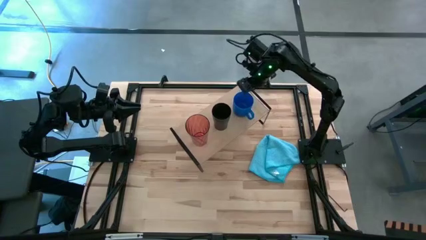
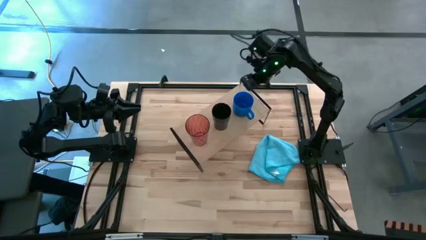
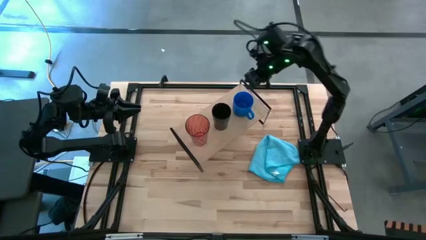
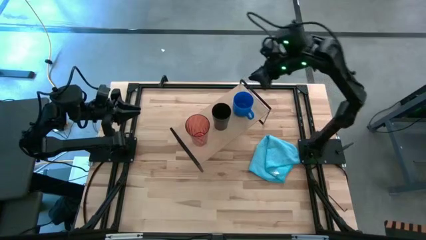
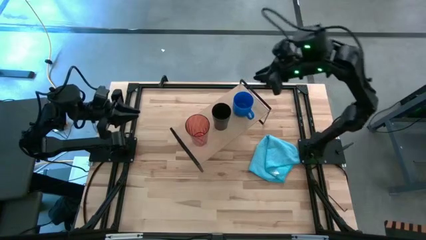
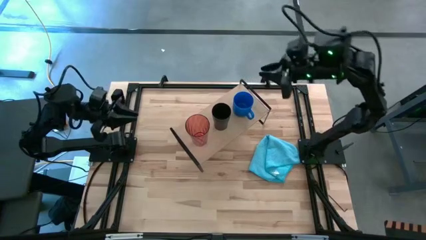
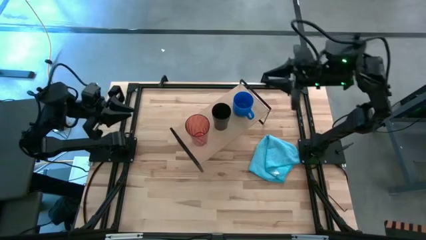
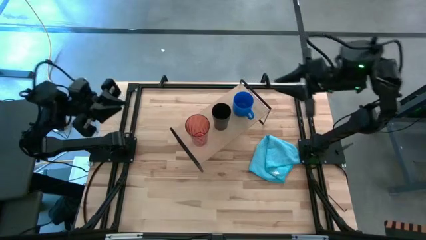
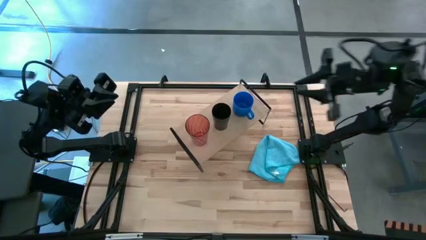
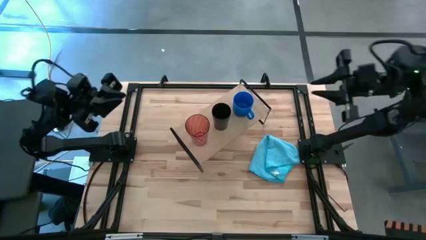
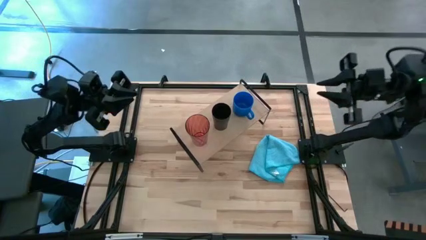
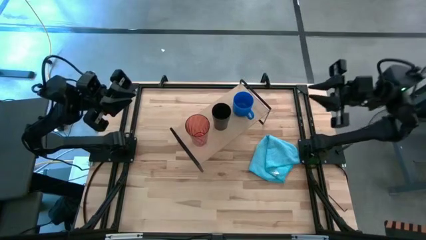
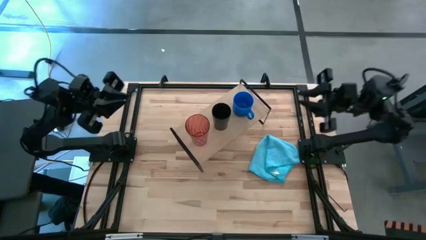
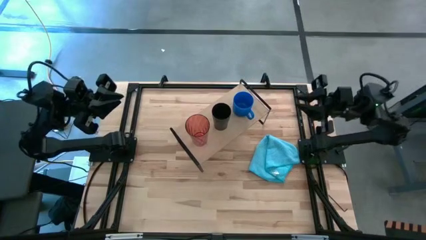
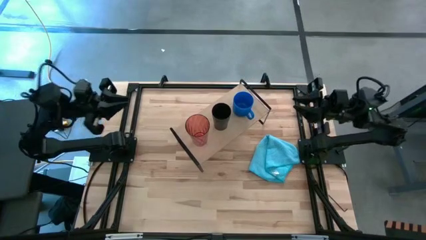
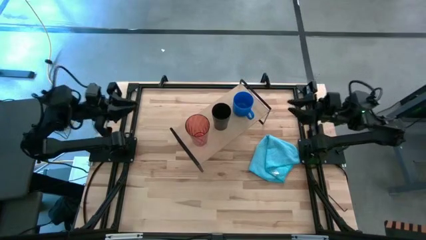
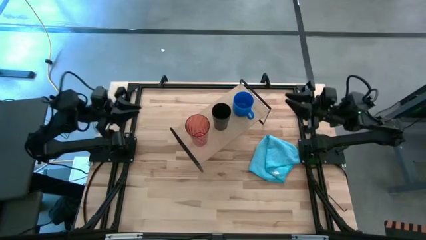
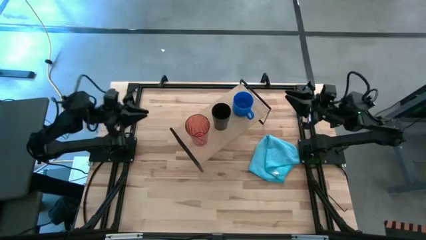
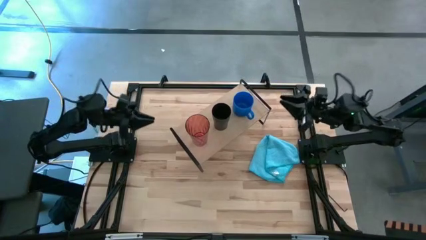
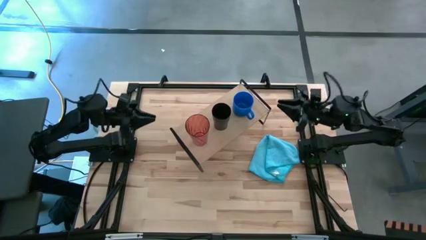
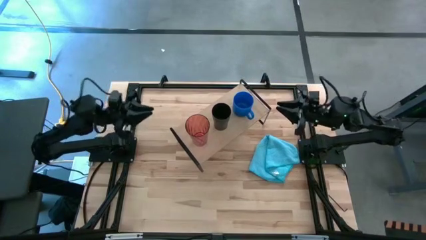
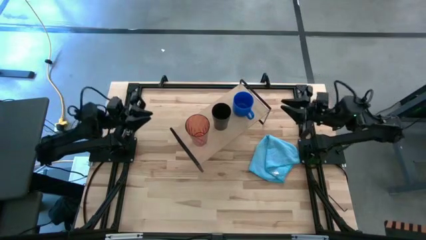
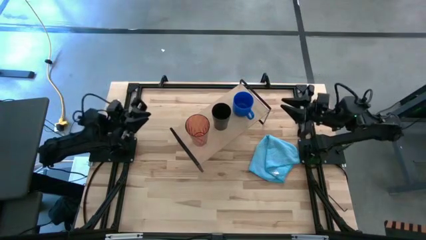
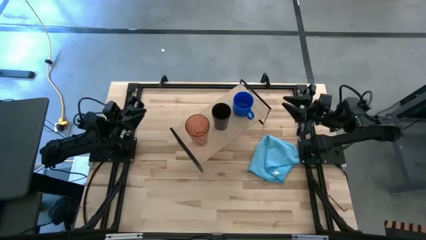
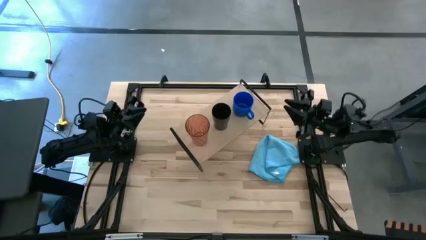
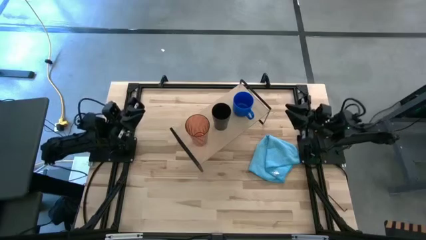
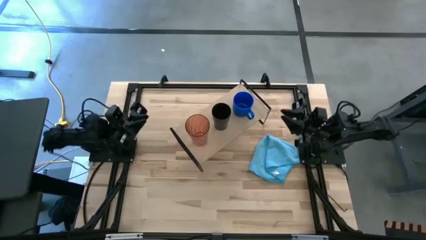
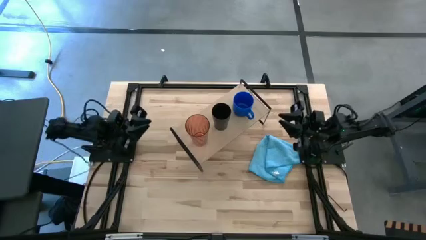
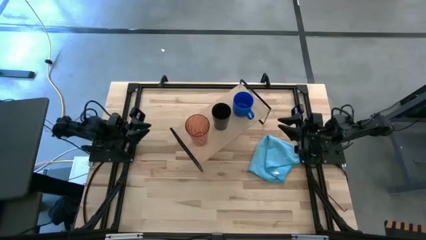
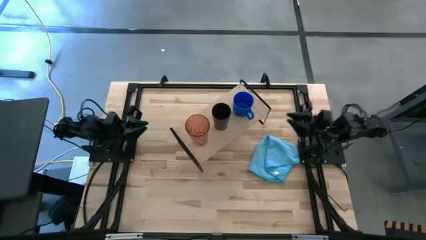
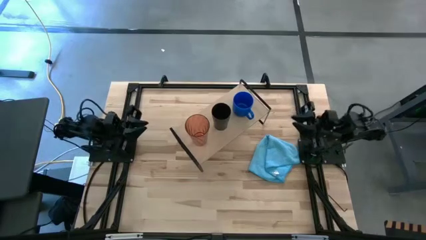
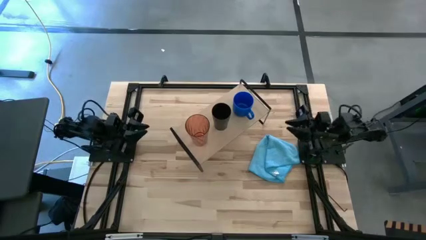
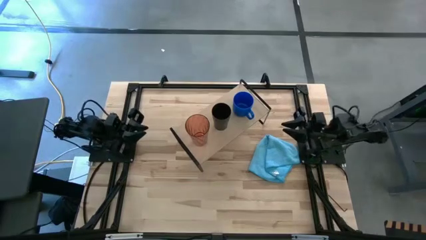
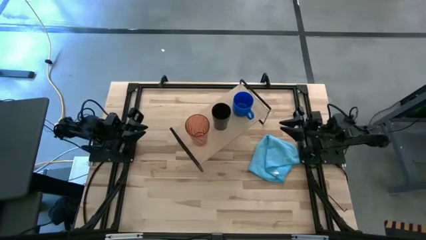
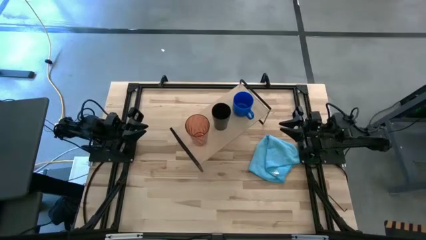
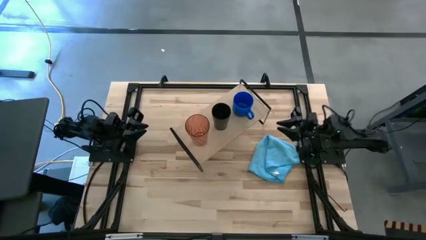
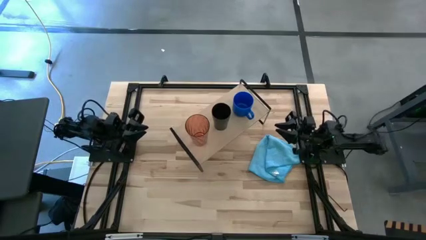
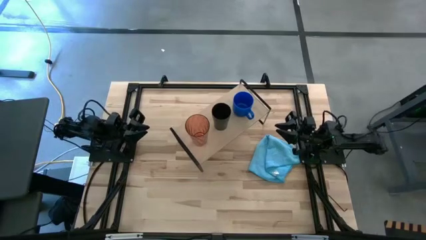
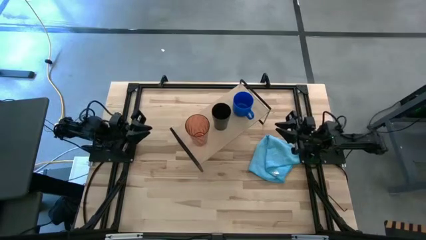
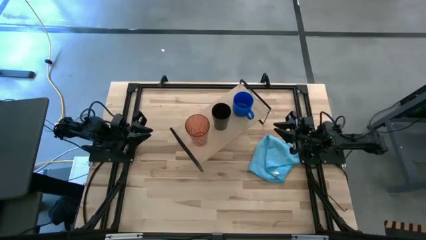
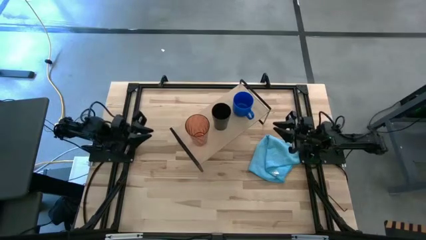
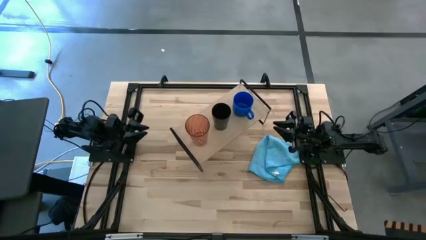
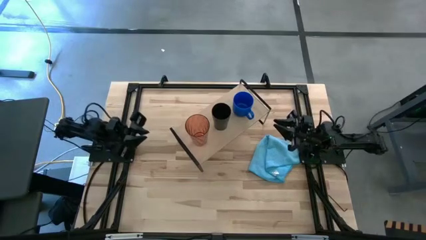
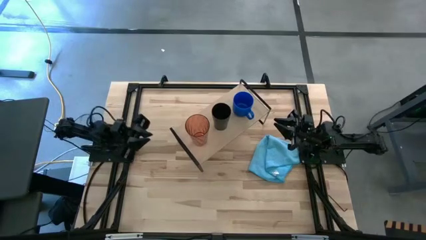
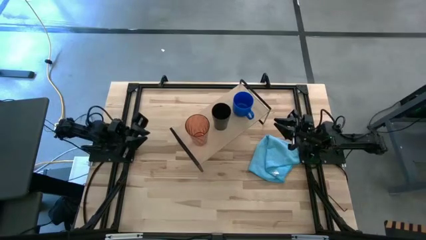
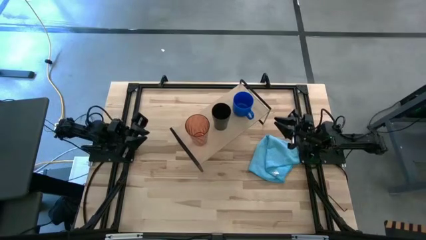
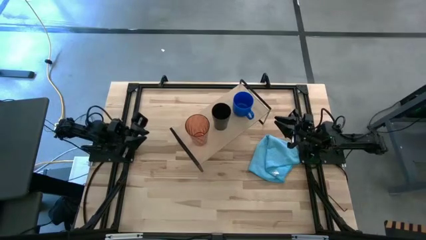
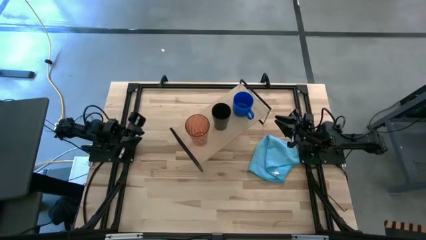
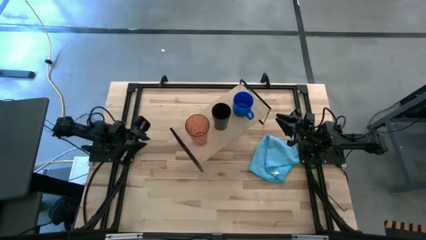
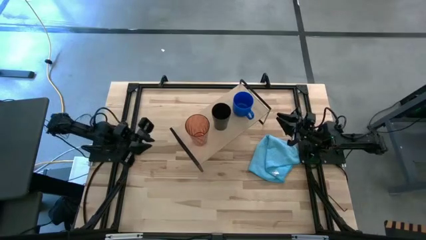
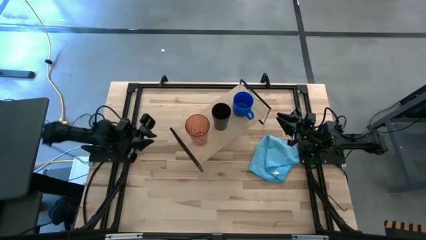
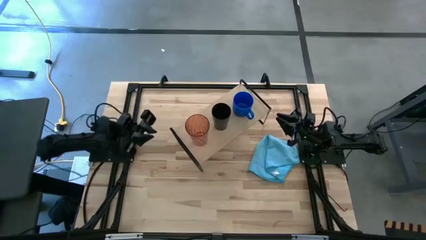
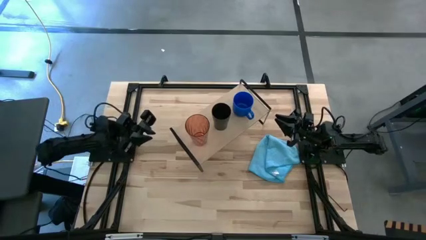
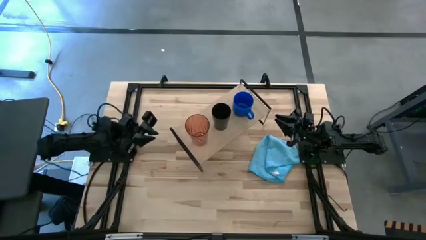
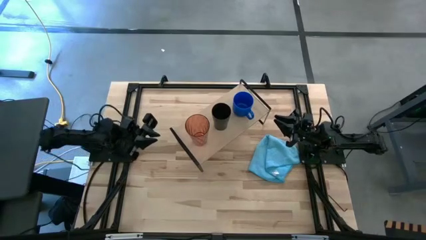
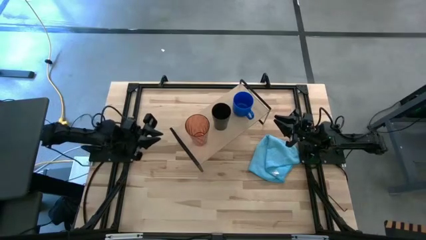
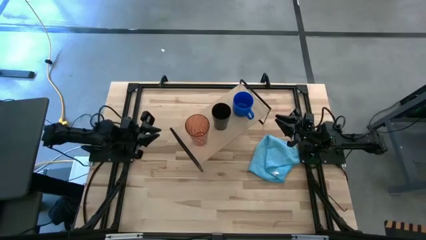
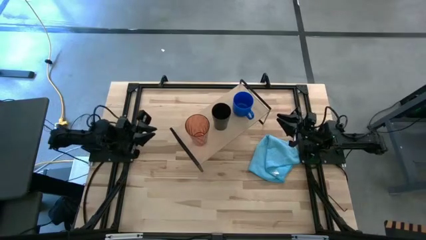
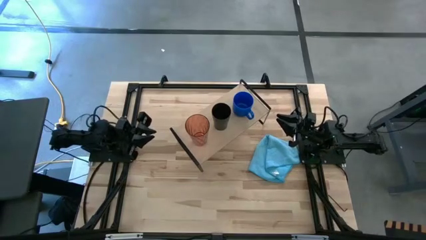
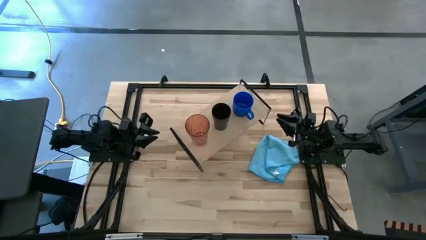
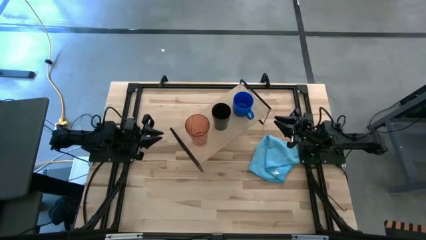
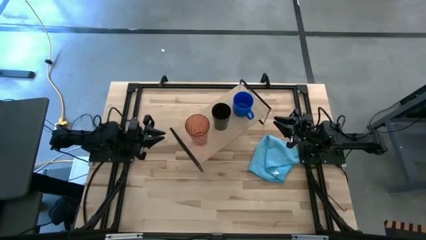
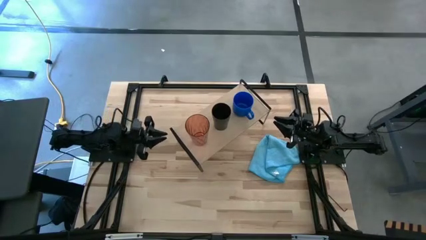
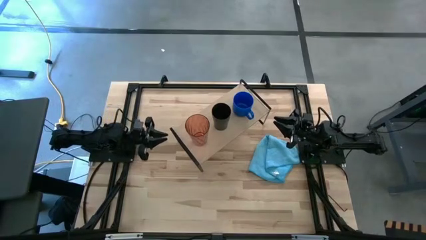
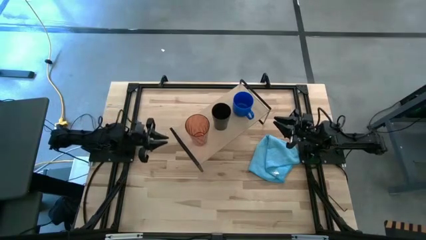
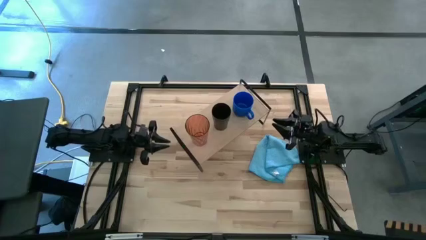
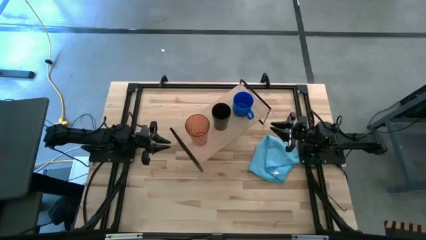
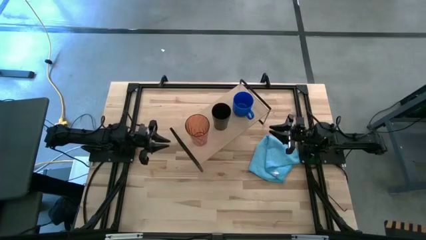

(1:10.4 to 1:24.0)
Task: Stack small to large cups/mugs on shelf
Return to Home Position
